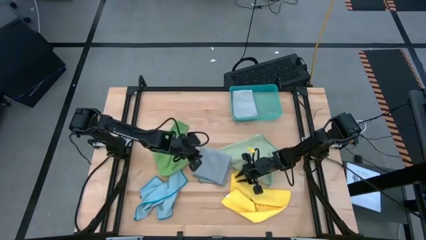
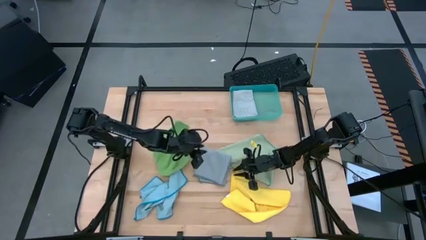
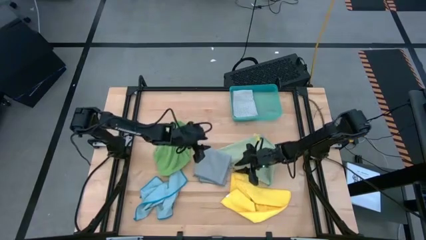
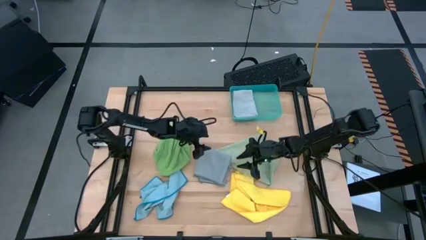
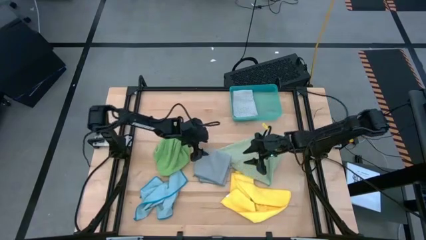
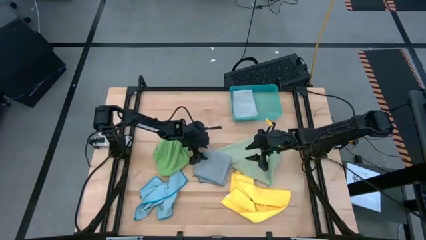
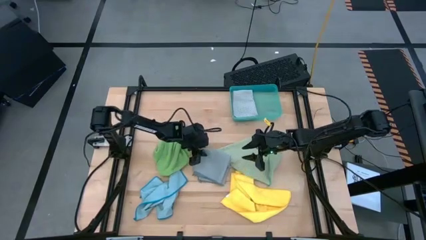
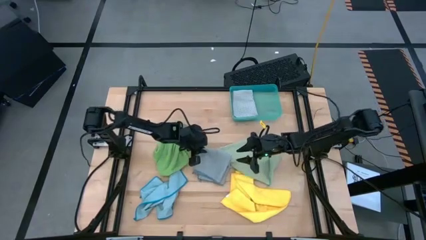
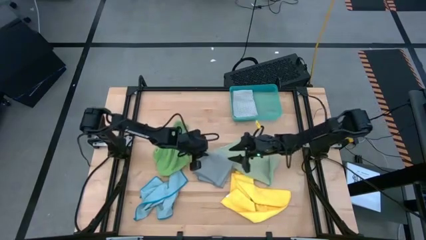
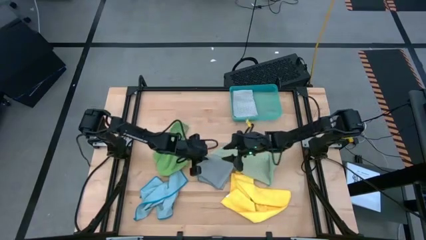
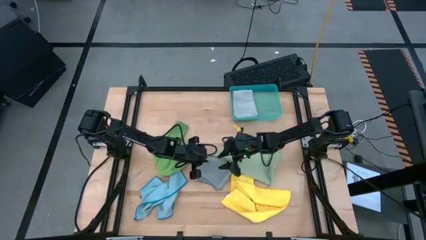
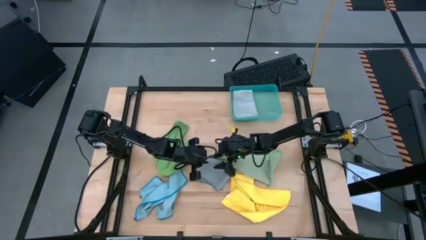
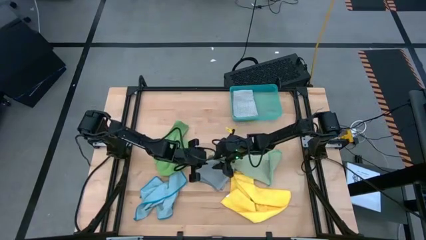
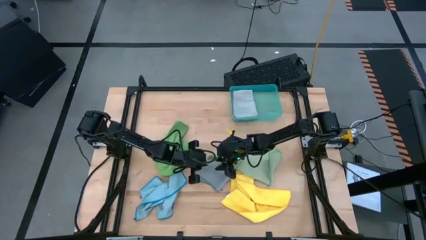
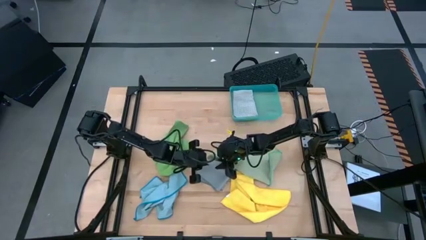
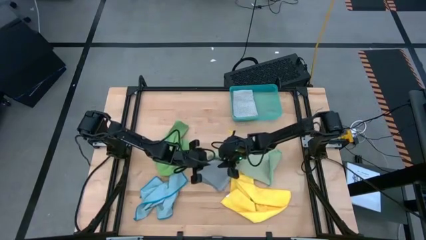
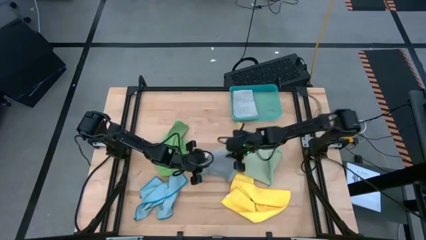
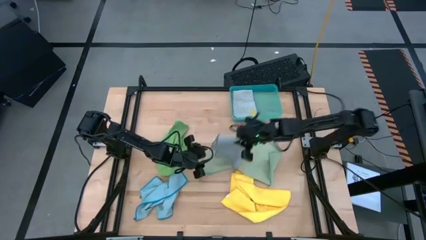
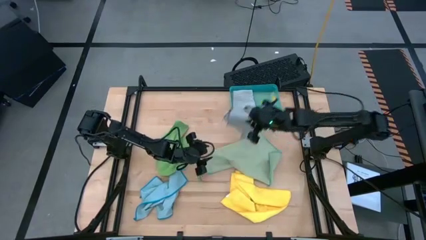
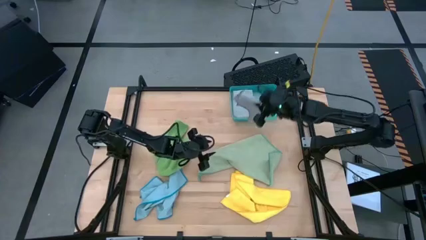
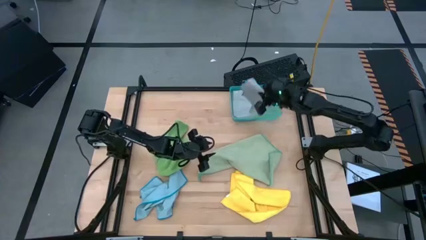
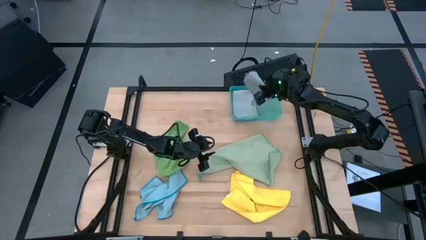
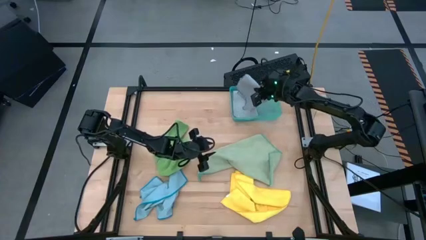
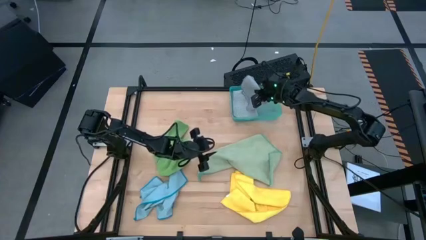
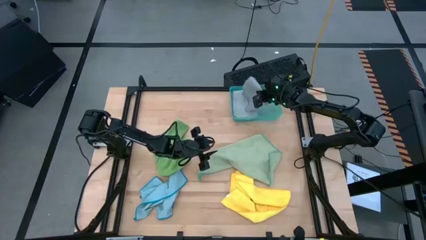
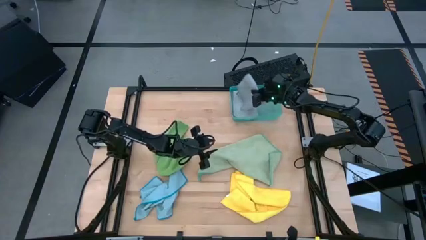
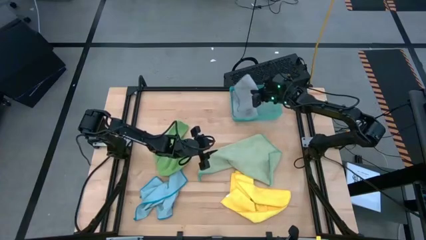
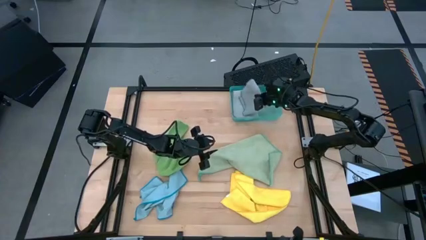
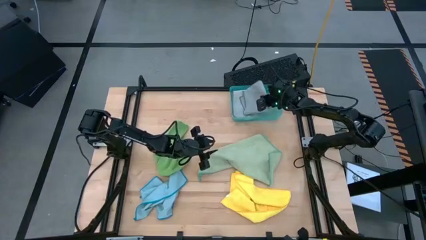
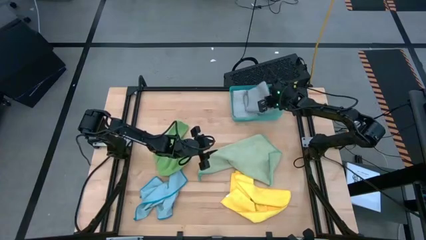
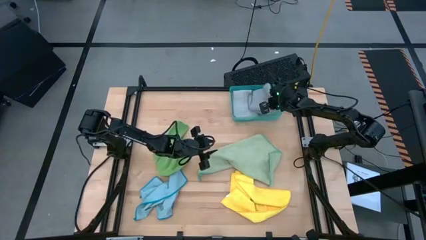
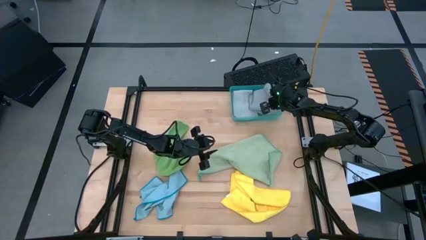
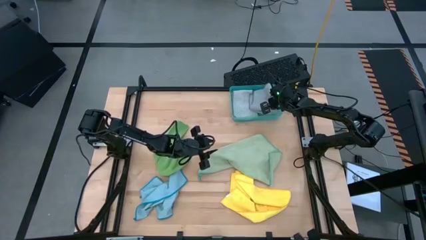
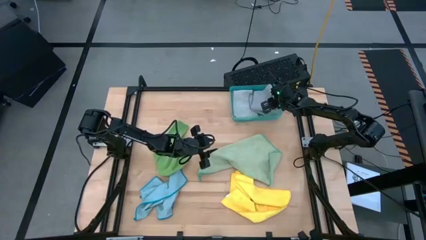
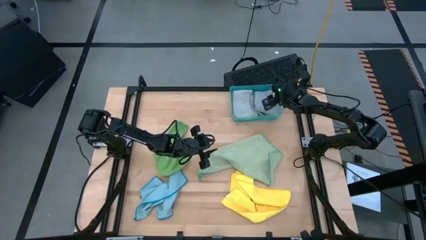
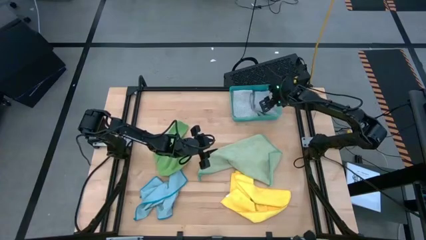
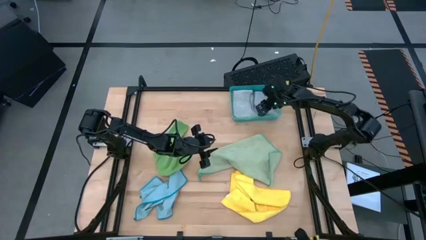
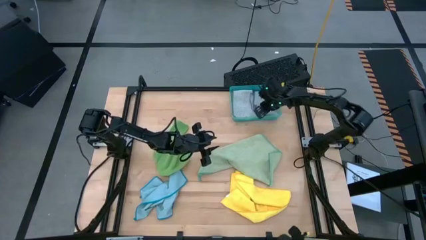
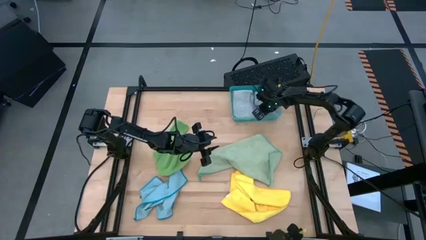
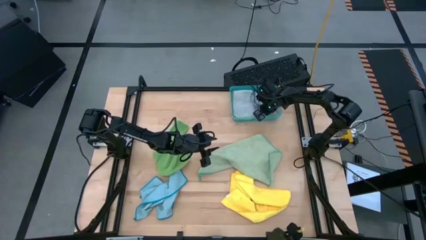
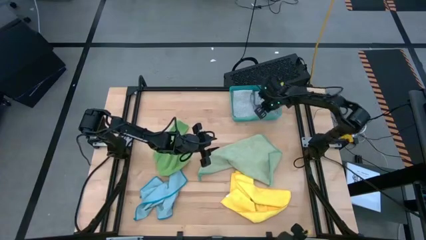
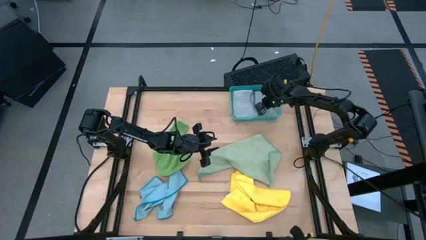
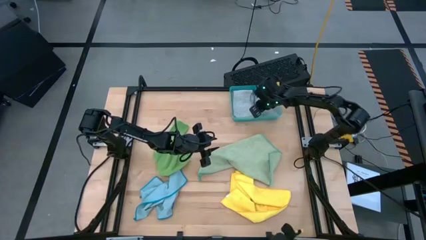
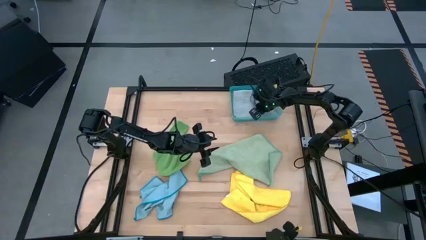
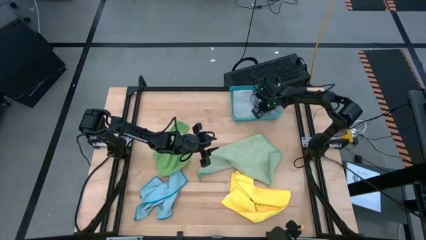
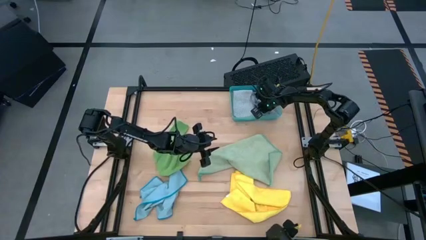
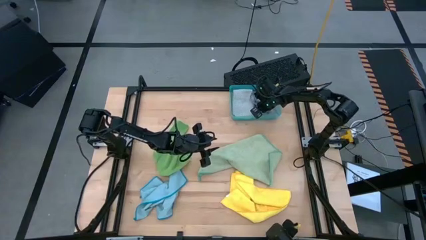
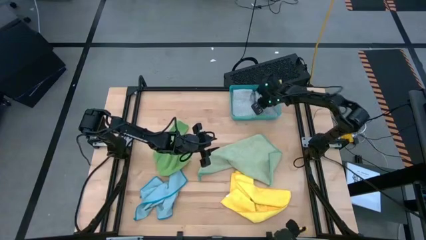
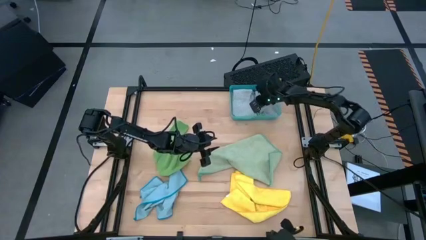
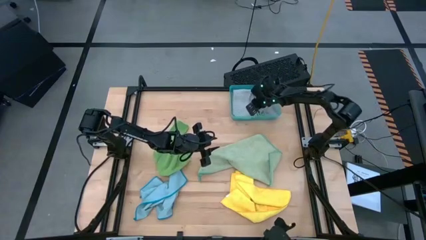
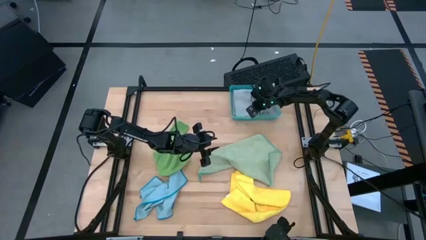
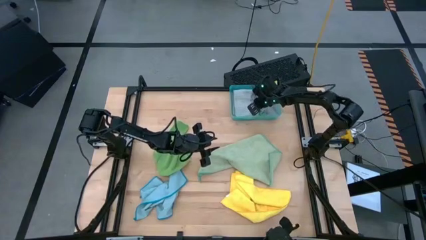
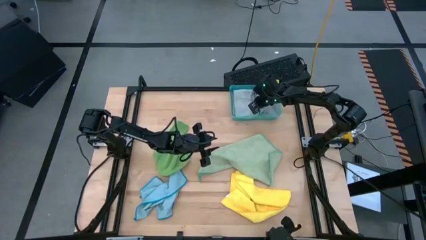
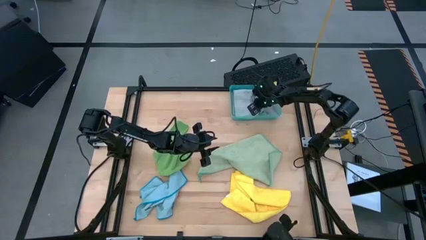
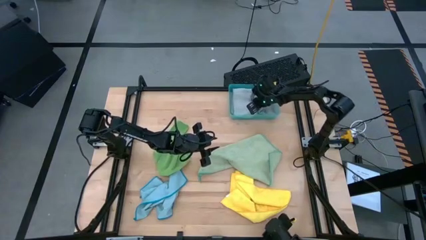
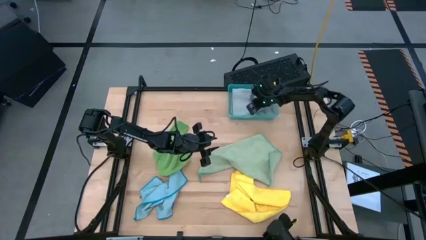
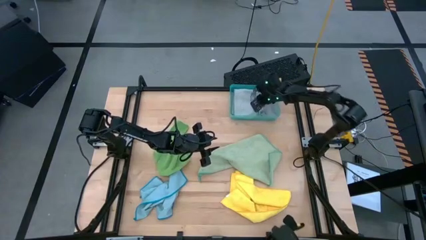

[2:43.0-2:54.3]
Task: Fold microfiber towels
Put the folded gray microfiber cloth into the bin

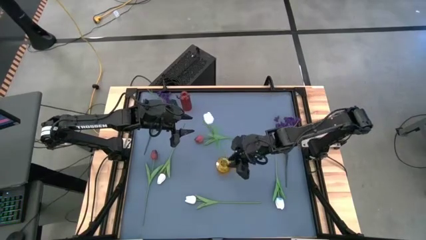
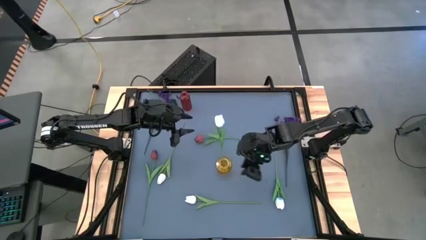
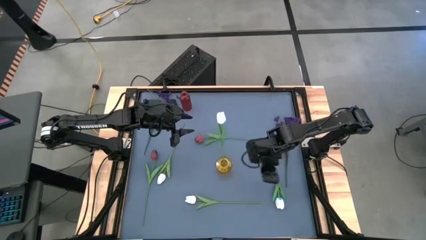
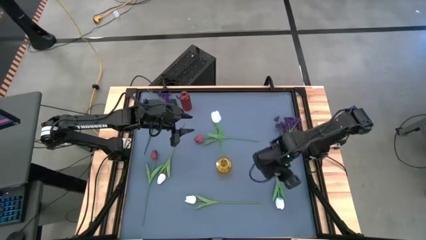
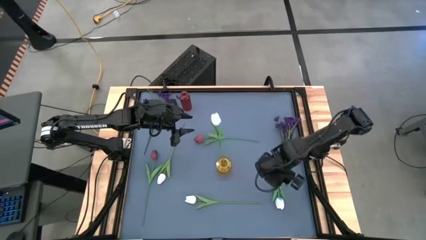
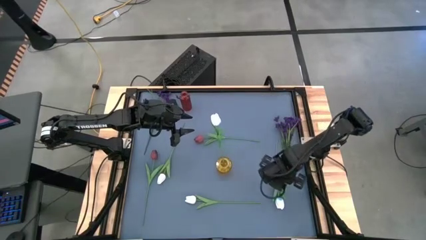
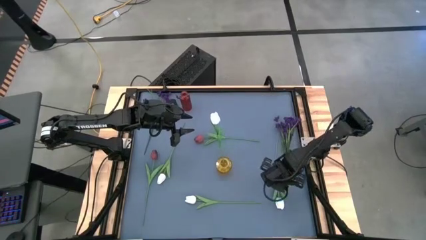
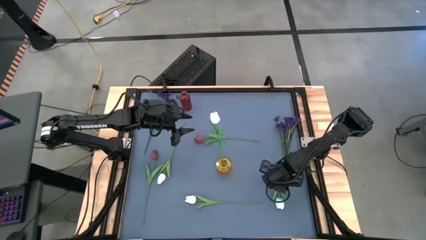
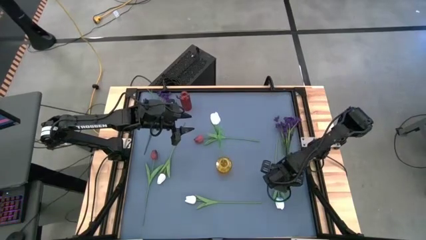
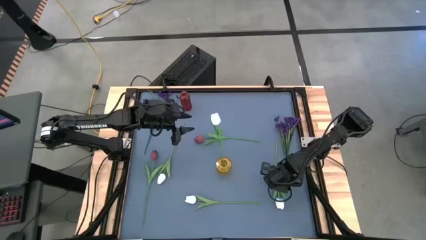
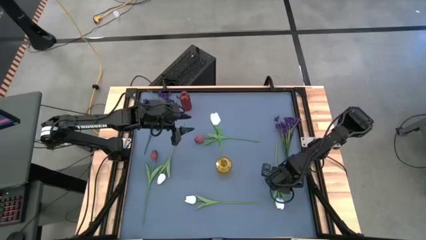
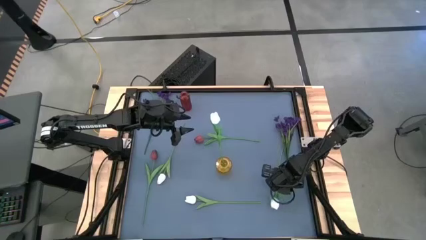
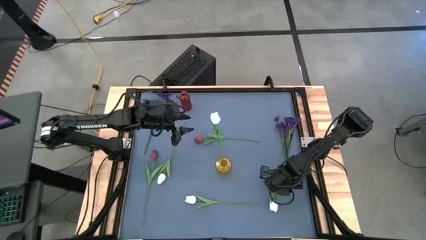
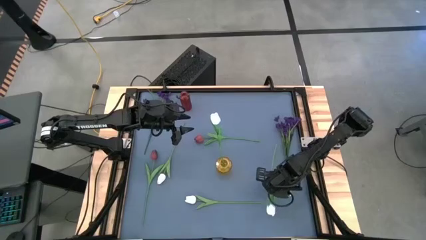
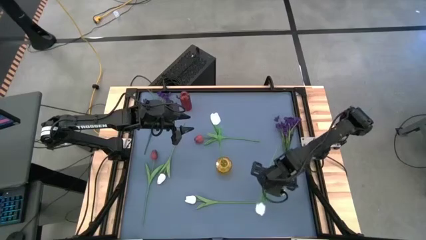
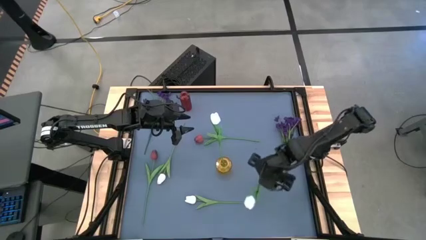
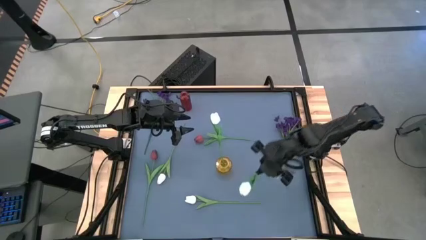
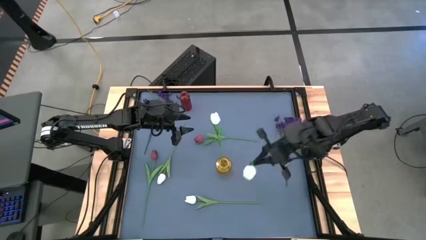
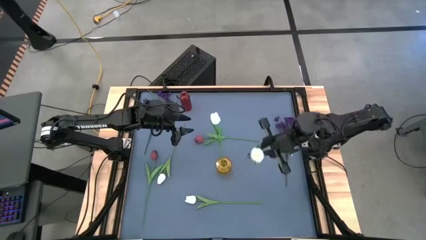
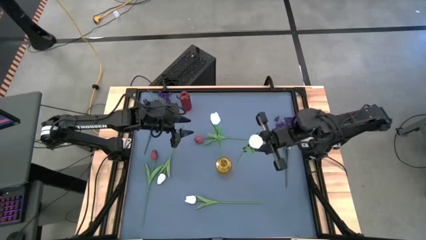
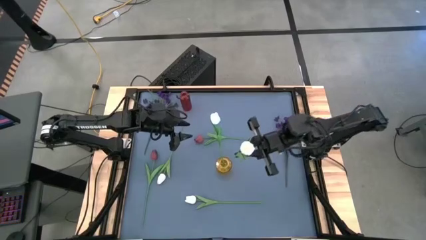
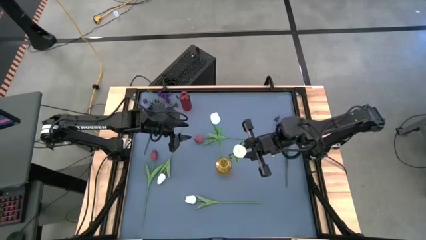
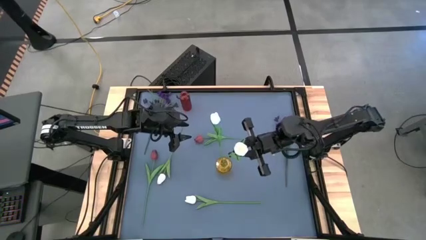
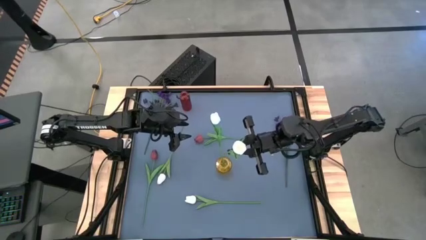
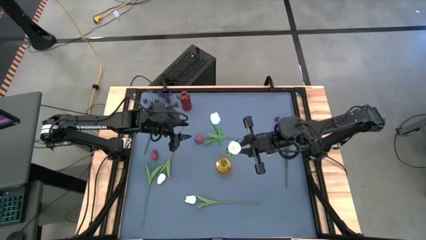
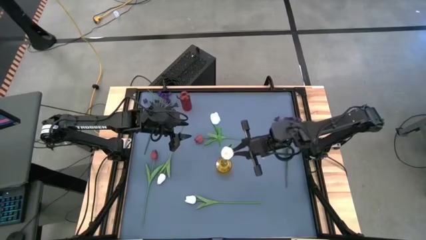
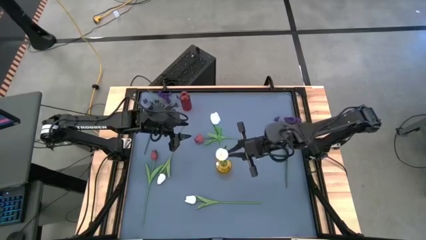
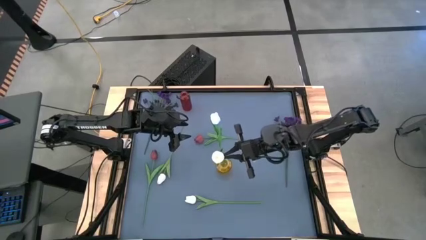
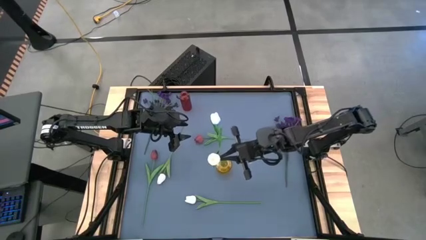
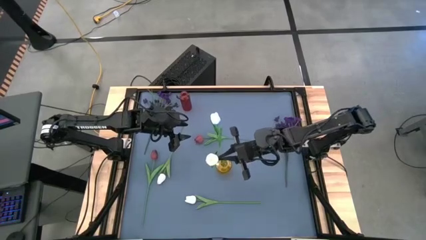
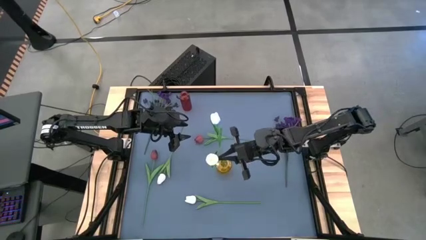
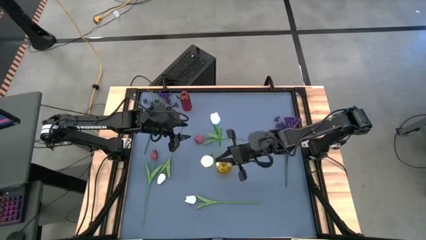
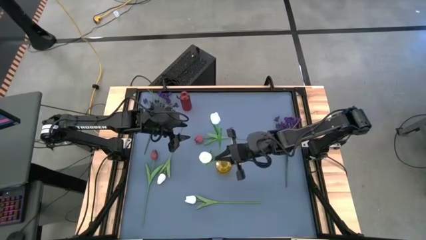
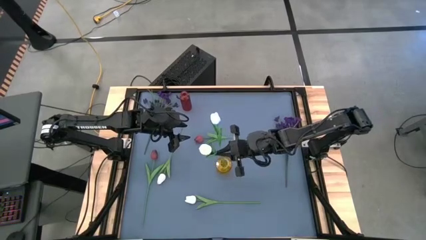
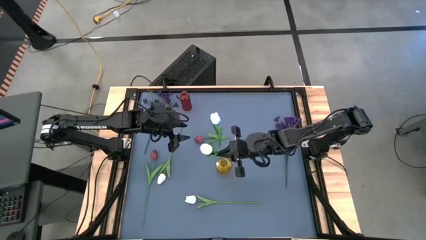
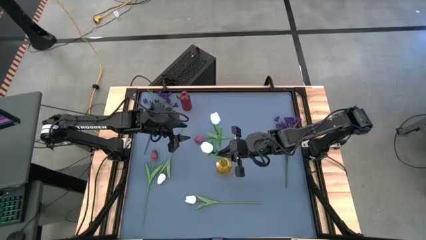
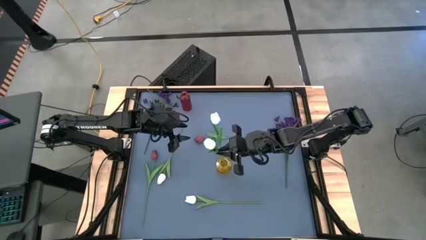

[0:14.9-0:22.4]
Task: Sort flowers into vase by color
Put the white flower into the yellow vase
